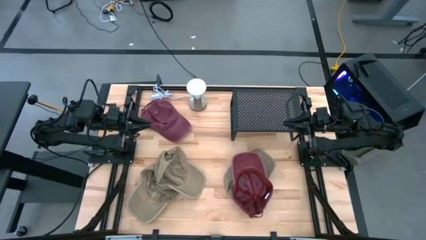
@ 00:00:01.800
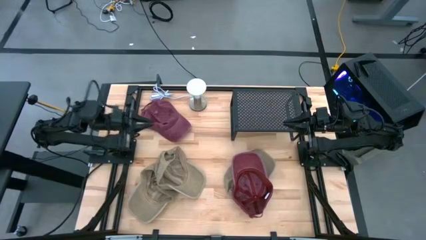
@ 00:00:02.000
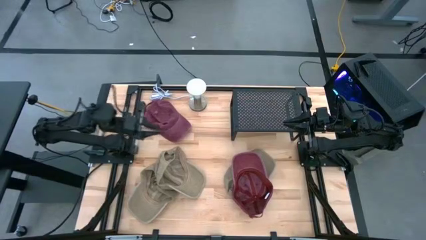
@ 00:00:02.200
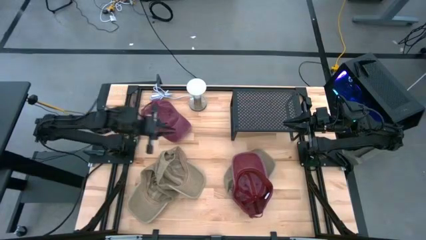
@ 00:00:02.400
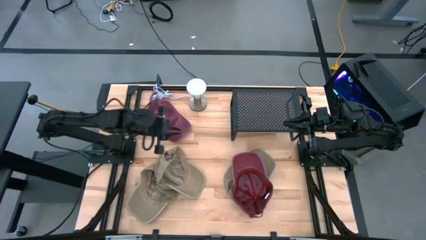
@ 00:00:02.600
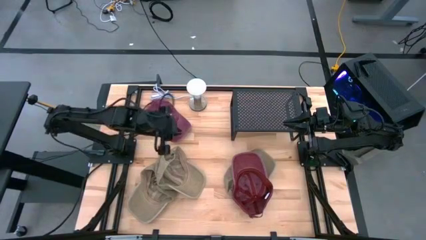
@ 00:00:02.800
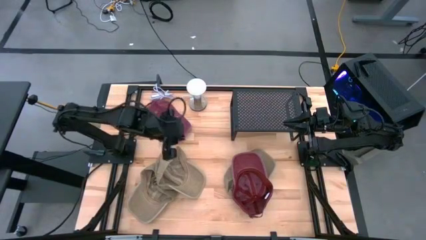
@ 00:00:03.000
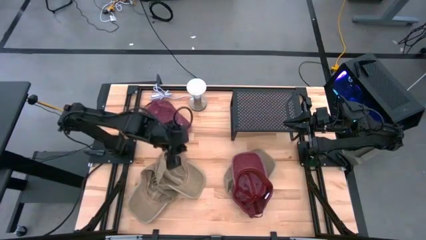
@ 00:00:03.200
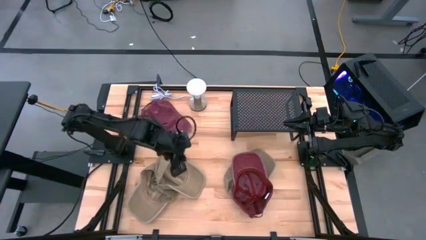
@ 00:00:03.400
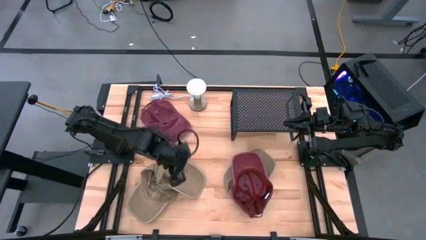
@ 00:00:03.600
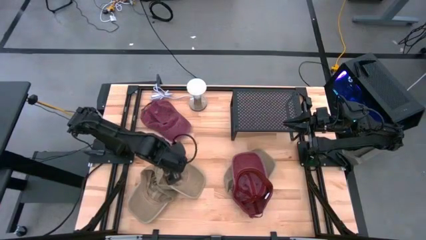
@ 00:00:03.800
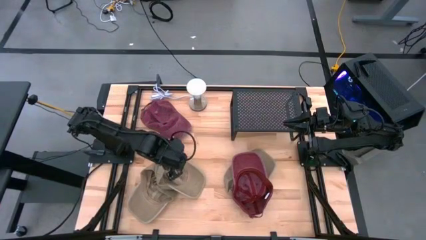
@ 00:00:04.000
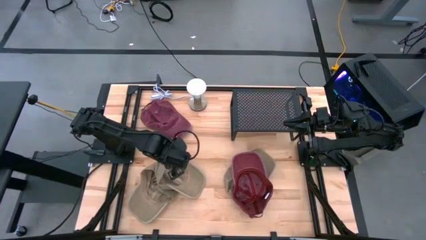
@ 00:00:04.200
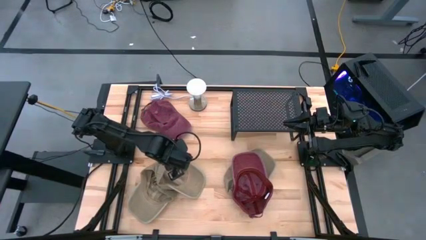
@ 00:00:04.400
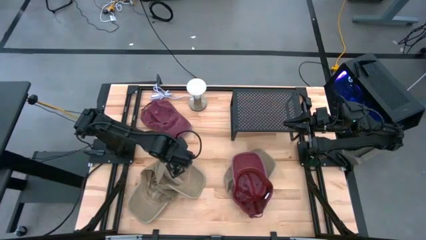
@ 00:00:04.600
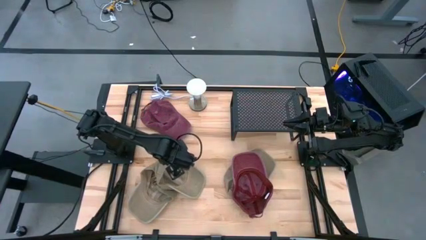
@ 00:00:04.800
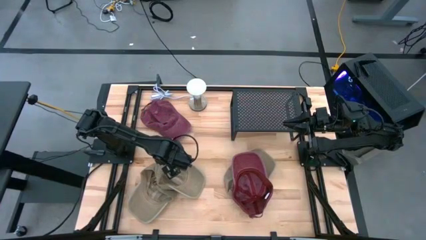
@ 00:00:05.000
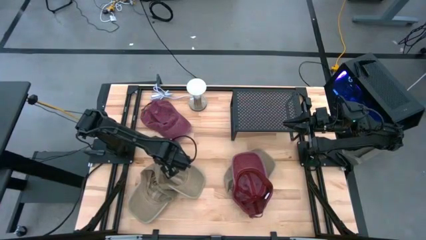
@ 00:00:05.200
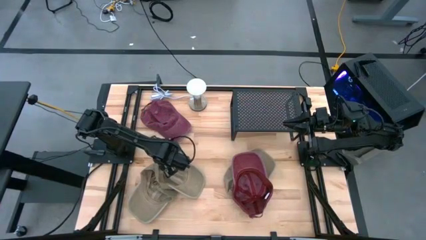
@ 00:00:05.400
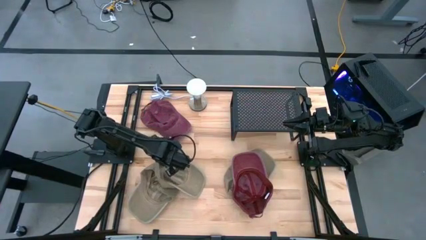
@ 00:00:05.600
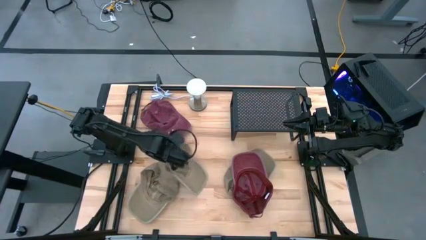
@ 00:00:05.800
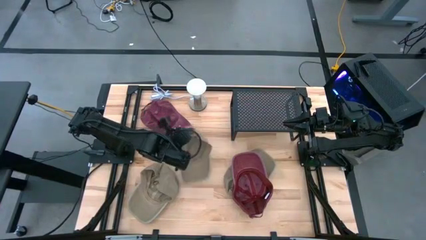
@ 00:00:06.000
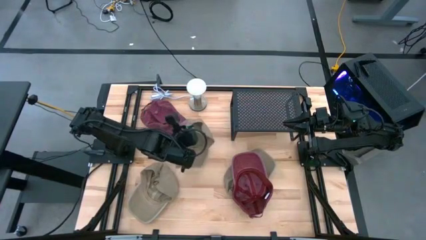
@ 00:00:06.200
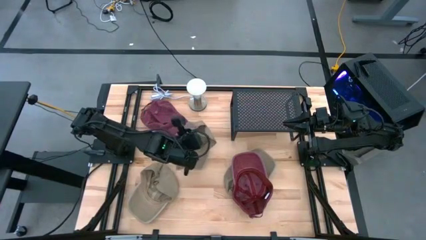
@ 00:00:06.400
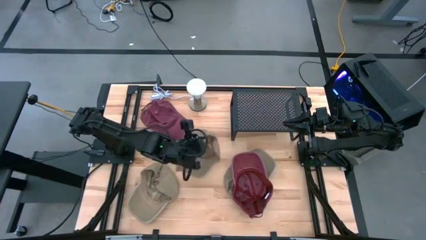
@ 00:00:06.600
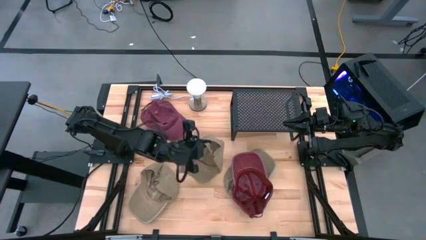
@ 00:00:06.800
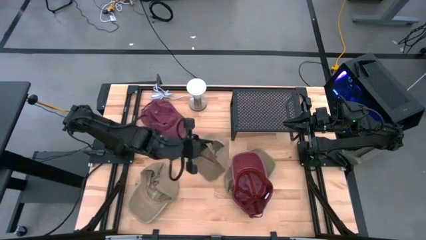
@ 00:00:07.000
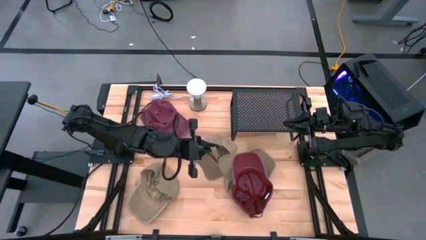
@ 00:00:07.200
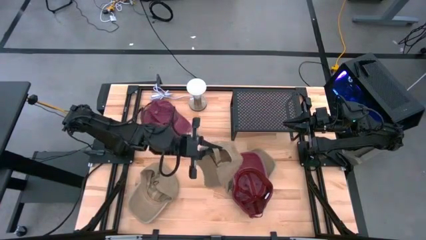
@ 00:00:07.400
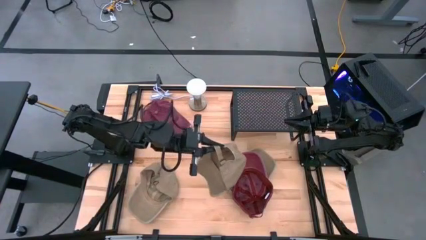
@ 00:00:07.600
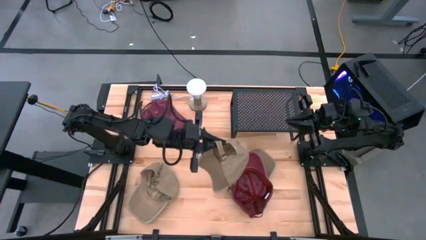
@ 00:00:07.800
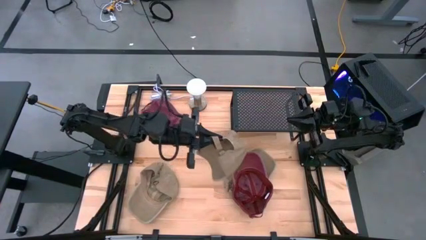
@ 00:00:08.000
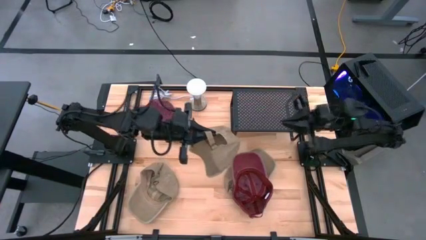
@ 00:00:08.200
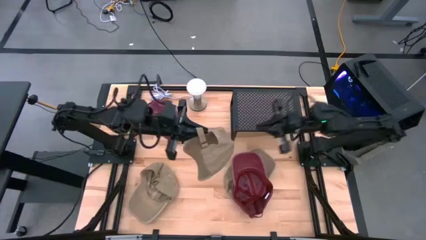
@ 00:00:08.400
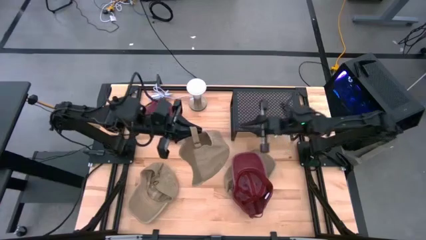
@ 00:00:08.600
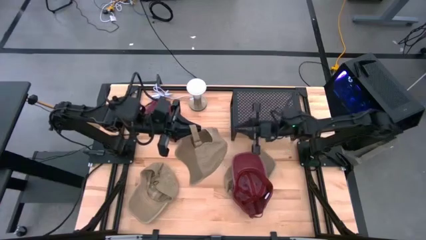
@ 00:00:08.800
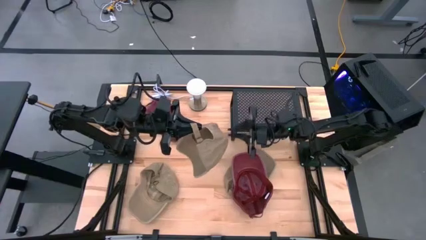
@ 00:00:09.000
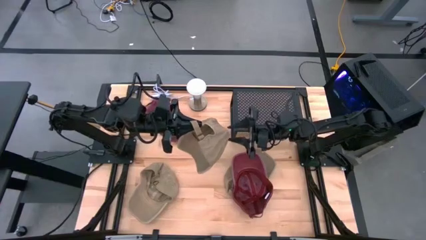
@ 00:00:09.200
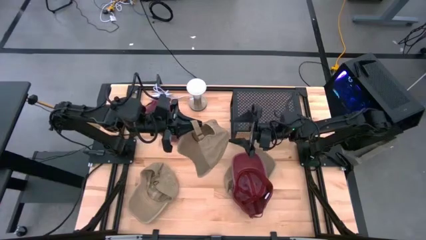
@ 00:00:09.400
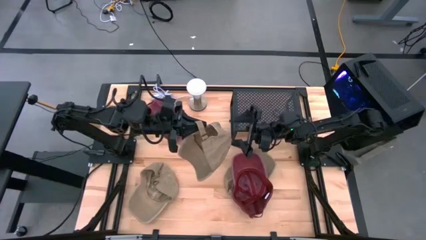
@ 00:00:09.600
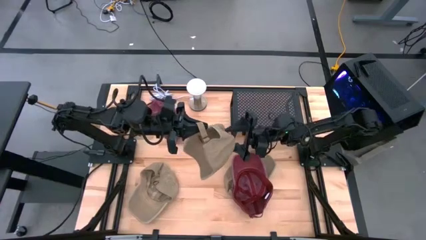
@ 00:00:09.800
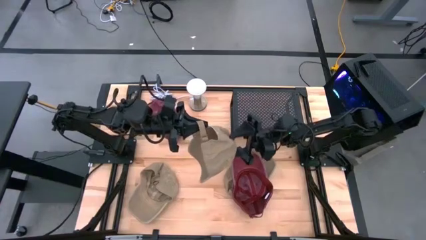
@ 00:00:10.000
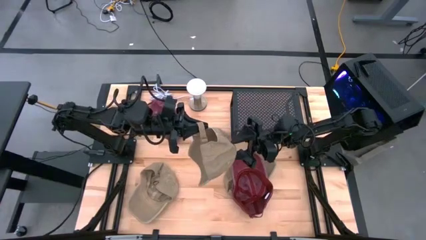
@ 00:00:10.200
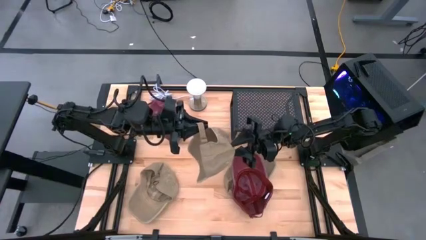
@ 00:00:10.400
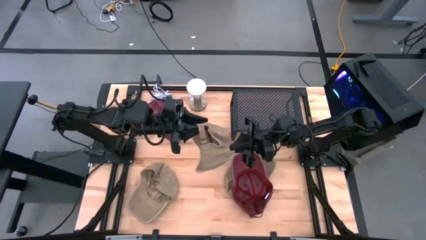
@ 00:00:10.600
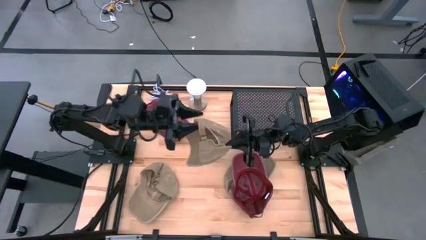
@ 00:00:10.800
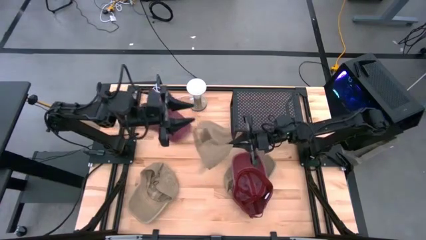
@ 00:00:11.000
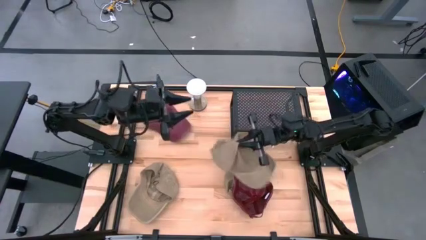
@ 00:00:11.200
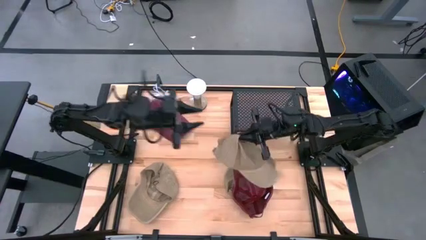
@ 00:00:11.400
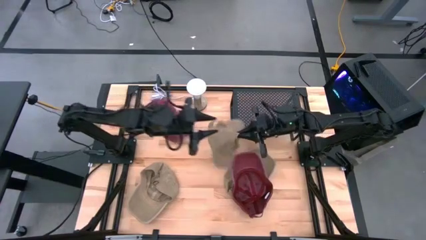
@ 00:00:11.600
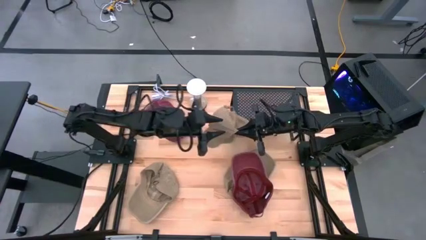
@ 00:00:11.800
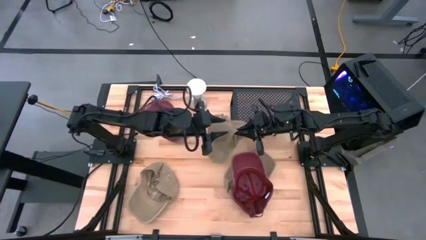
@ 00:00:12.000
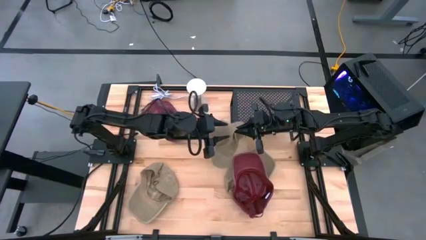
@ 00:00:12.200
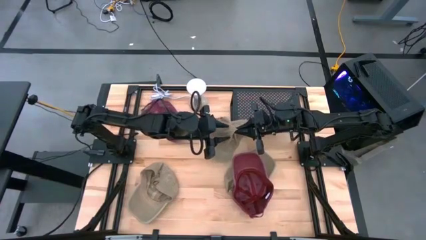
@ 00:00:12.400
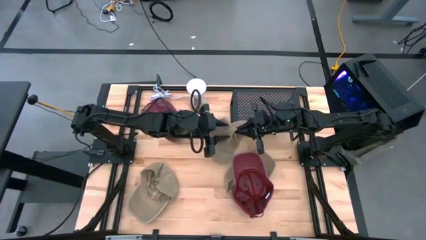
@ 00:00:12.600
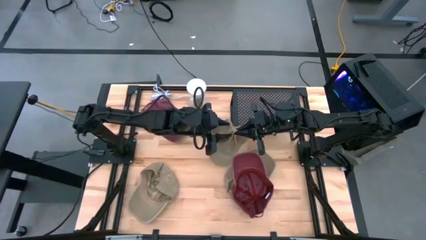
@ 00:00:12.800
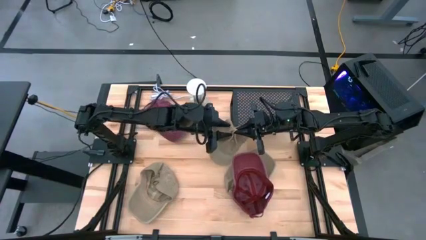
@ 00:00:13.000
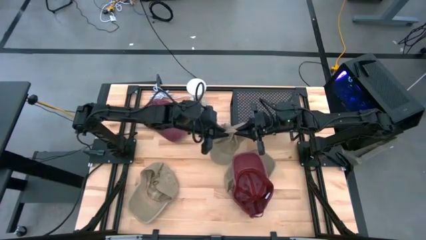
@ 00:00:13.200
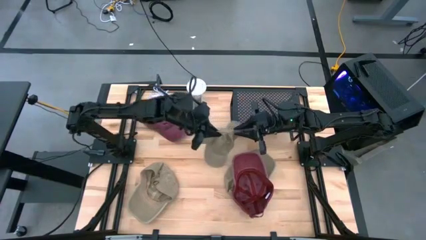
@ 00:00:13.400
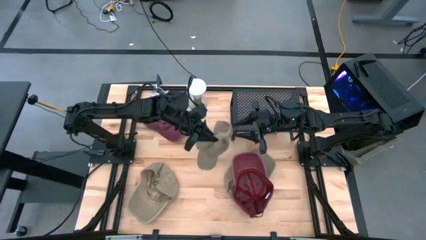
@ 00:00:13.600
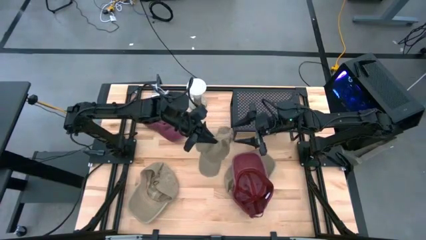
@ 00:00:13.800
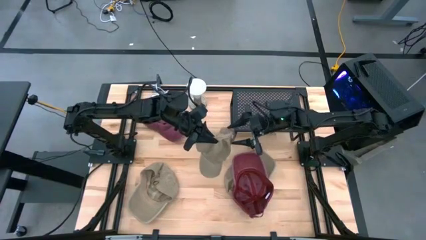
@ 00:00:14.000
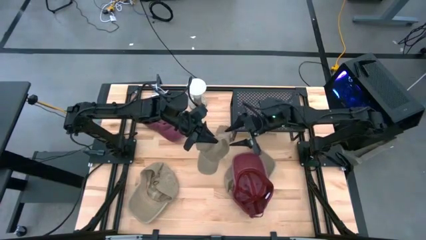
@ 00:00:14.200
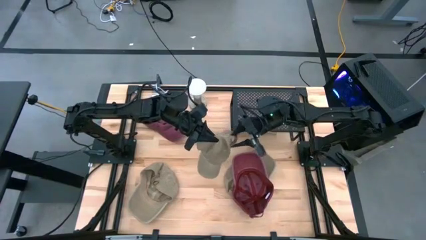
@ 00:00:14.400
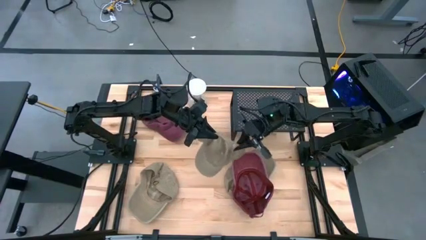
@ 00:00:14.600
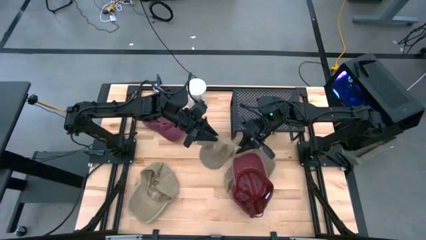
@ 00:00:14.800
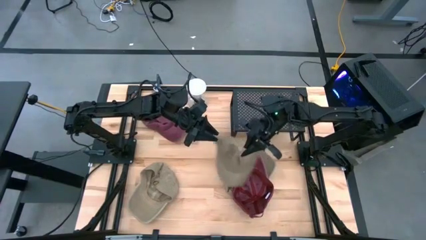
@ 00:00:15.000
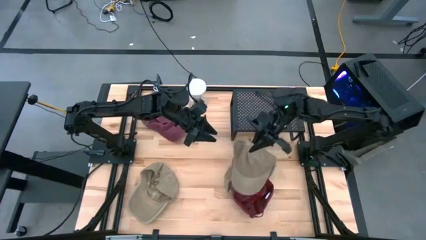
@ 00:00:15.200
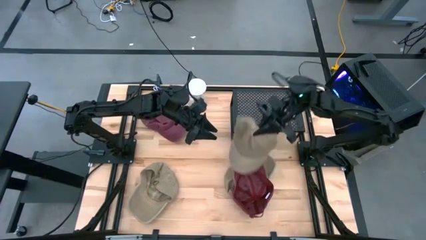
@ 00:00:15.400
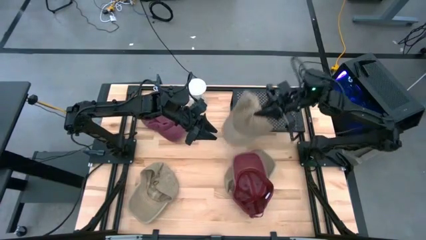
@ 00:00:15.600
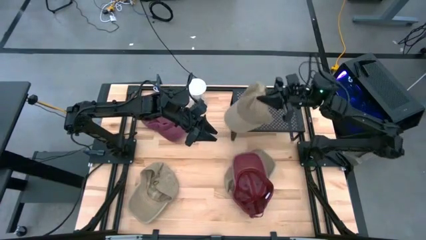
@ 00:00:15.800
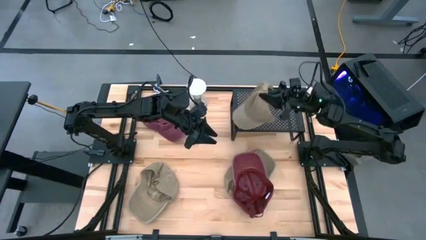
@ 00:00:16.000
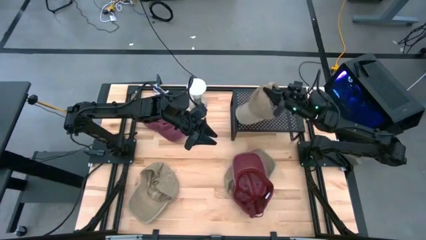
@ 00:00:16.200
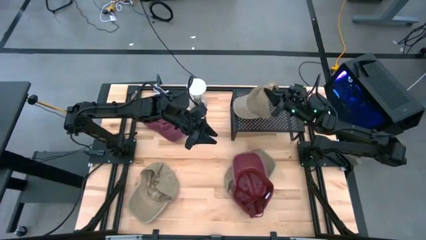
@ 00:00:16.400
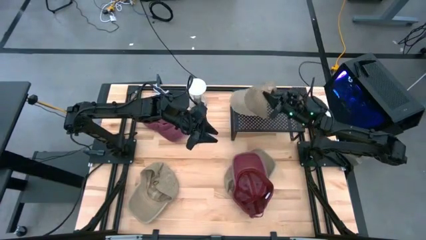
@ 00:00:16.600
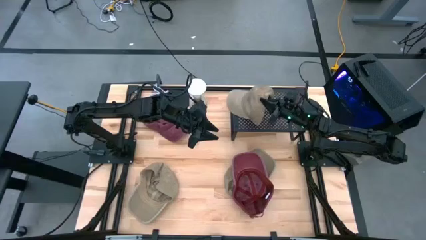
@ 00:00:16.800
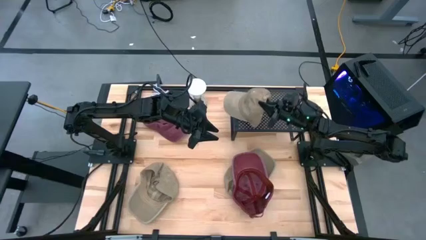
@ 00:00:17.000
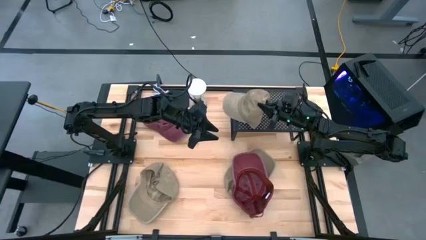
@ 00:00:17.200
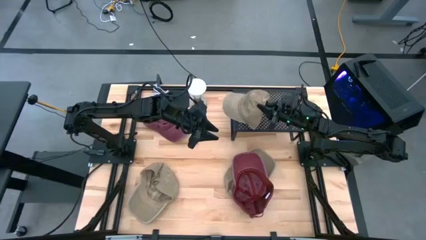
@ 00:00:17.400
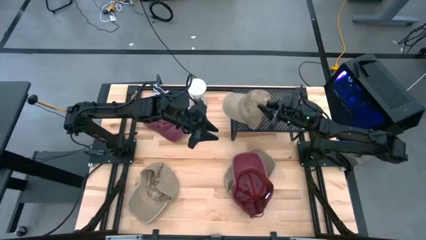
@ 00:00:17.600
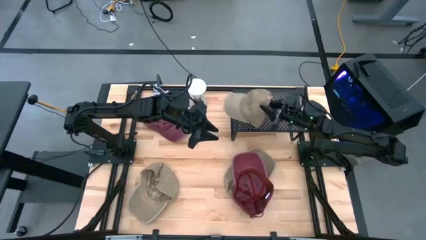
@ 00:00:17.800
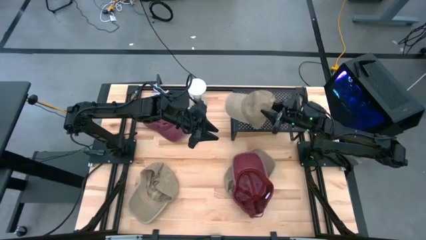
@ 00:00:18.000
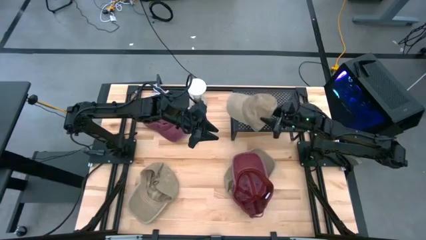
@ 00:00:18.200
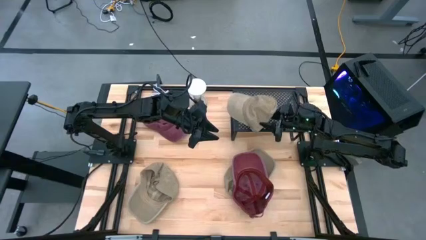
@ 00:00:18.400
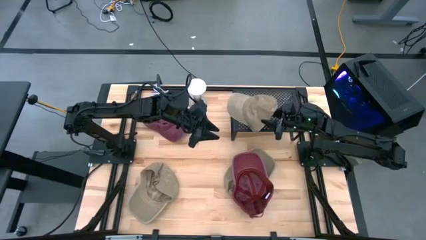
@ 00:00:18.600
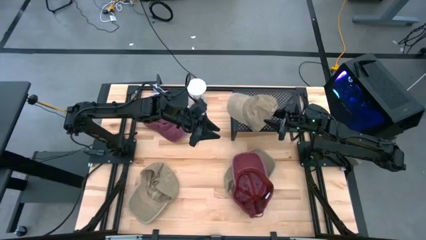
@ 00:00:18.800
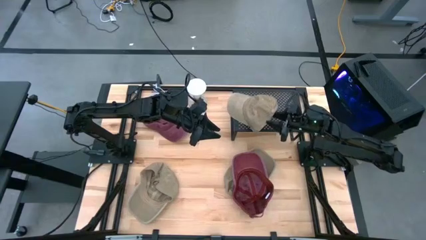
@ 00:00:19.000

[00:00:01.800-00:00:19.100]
Task: Pick & Place hat
Put the top brown hat on the black shelf
